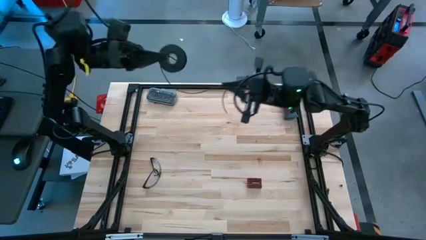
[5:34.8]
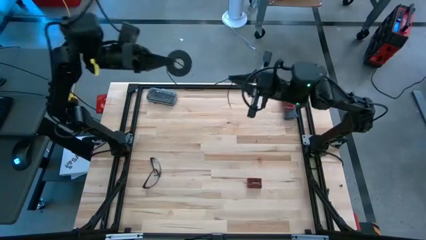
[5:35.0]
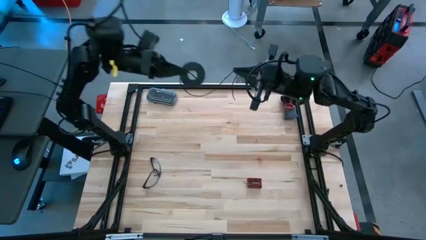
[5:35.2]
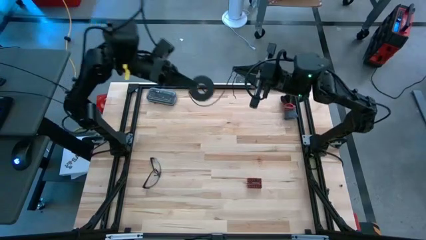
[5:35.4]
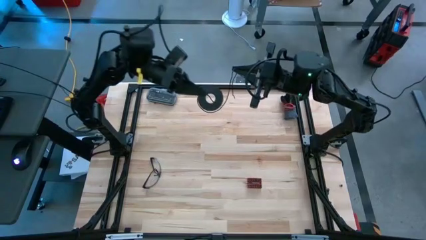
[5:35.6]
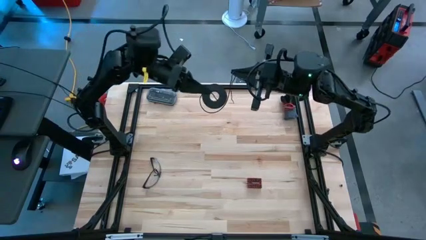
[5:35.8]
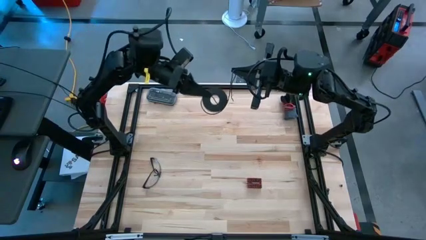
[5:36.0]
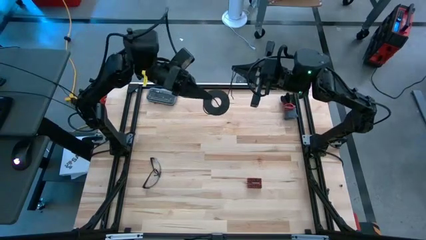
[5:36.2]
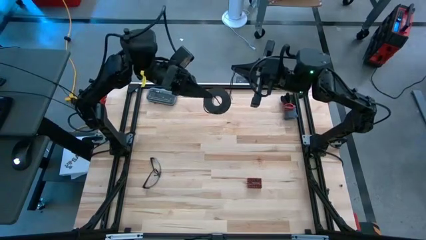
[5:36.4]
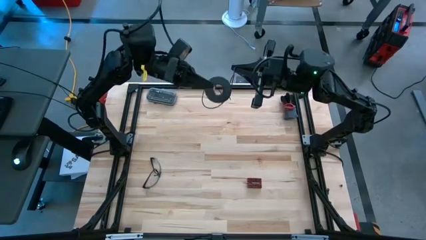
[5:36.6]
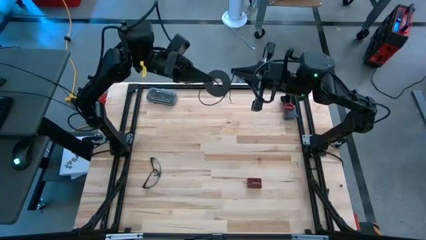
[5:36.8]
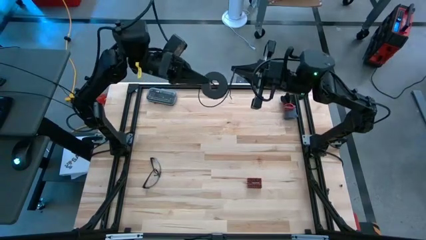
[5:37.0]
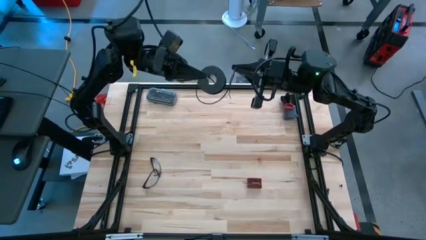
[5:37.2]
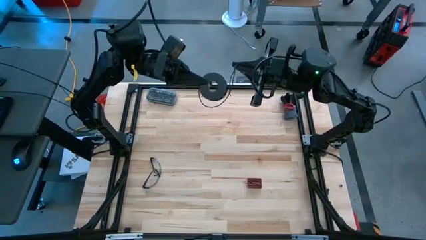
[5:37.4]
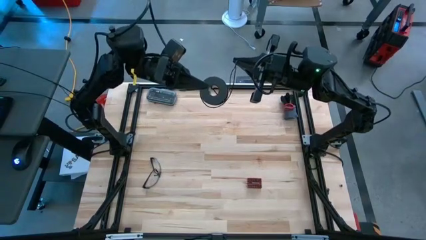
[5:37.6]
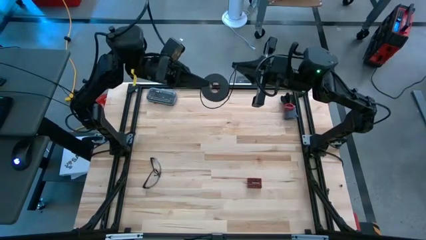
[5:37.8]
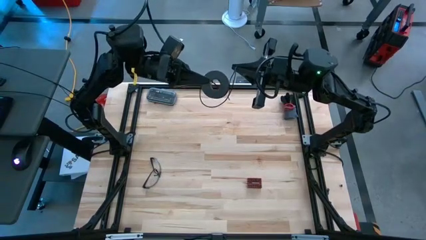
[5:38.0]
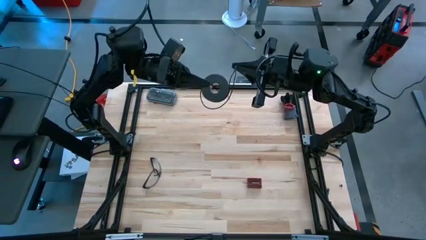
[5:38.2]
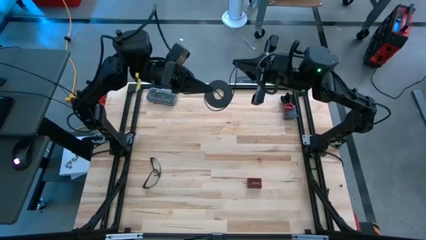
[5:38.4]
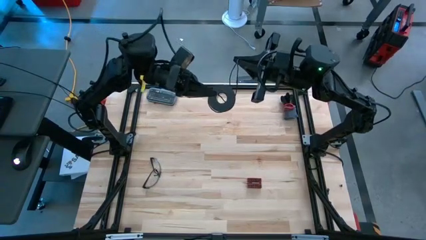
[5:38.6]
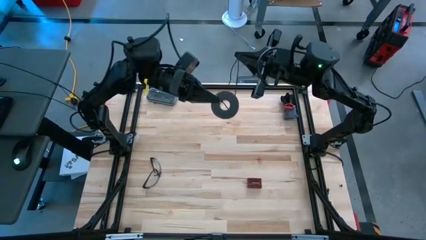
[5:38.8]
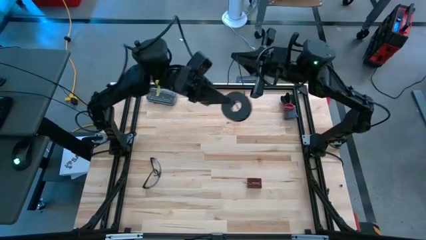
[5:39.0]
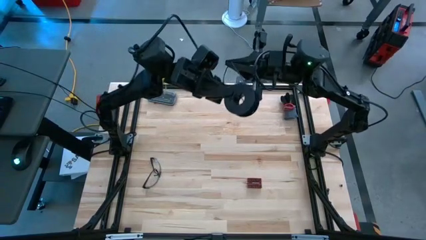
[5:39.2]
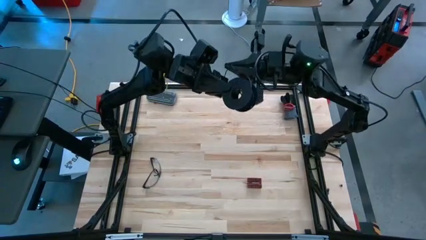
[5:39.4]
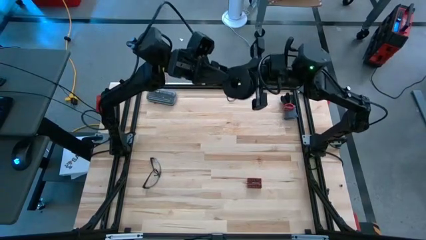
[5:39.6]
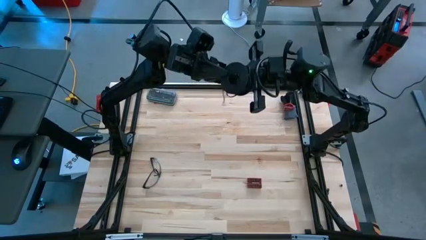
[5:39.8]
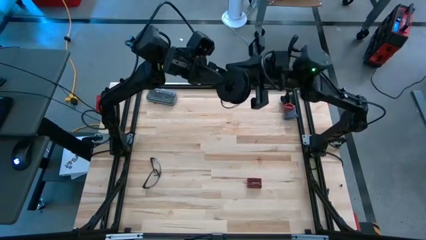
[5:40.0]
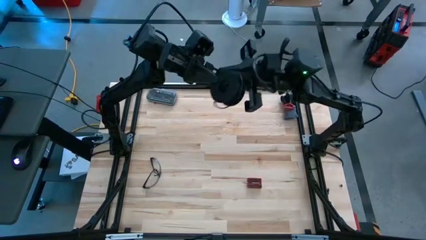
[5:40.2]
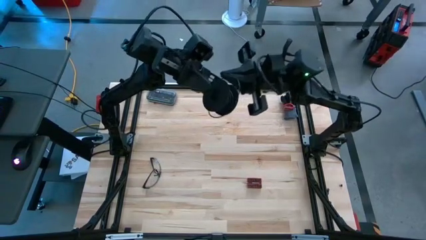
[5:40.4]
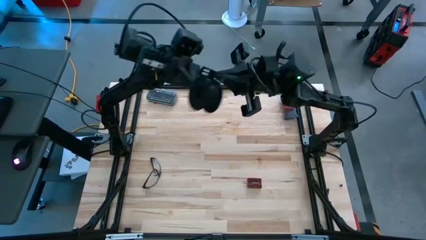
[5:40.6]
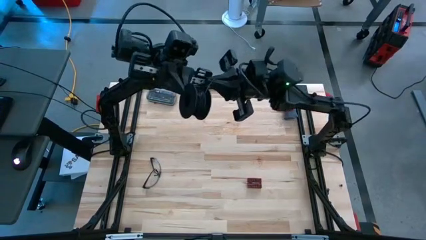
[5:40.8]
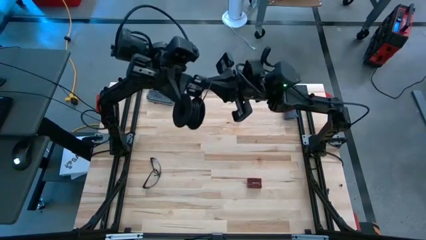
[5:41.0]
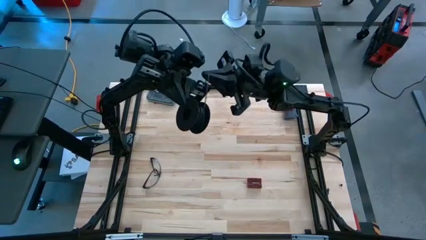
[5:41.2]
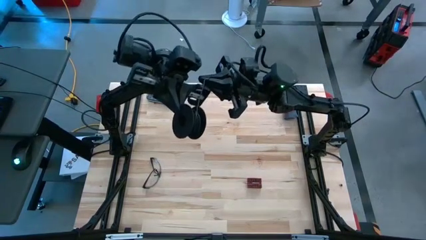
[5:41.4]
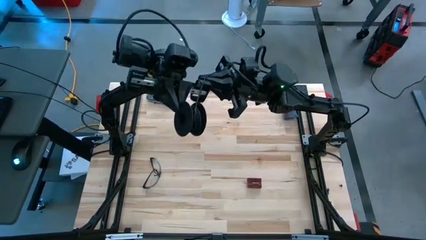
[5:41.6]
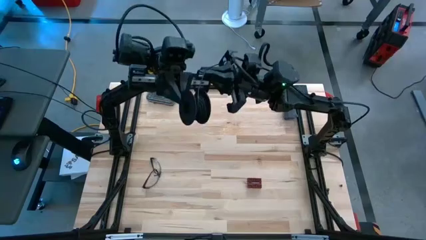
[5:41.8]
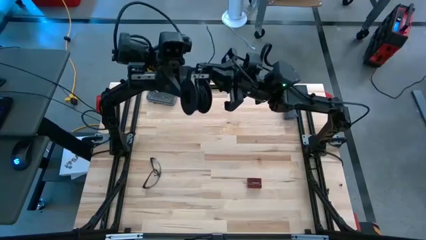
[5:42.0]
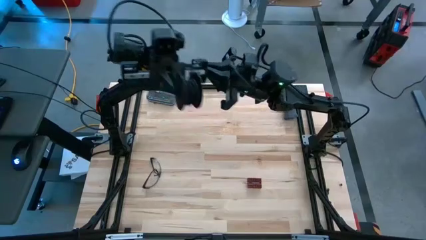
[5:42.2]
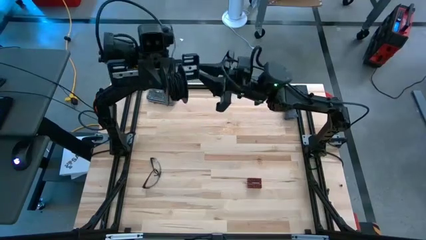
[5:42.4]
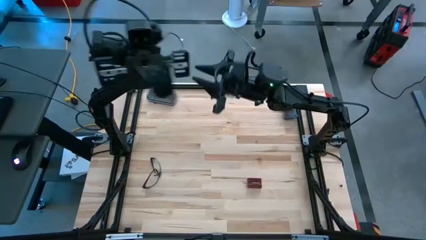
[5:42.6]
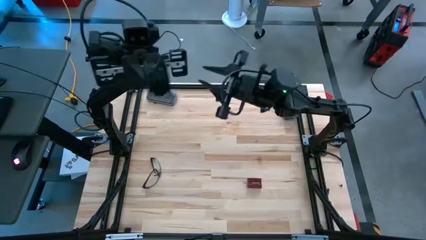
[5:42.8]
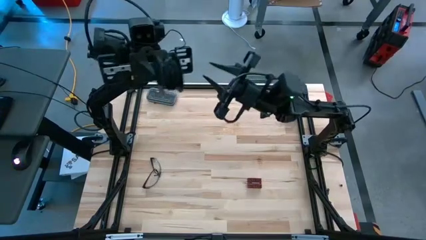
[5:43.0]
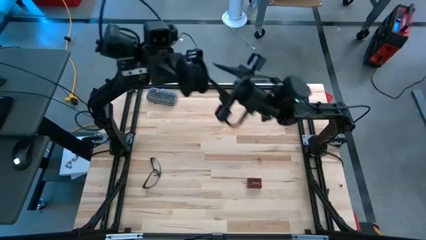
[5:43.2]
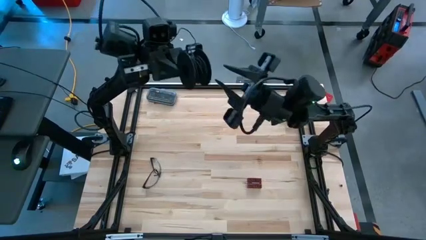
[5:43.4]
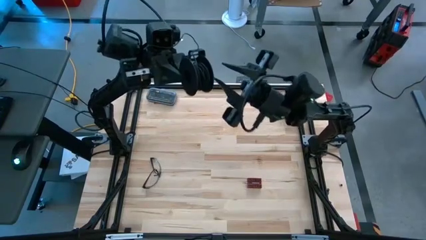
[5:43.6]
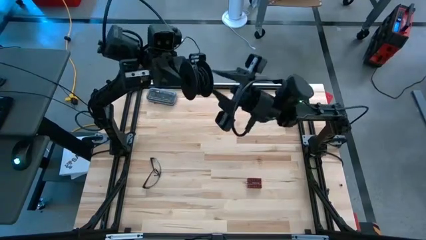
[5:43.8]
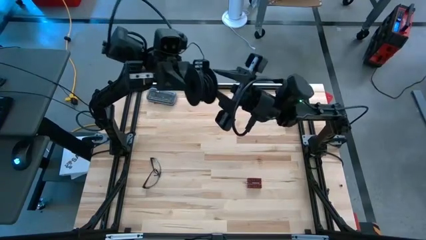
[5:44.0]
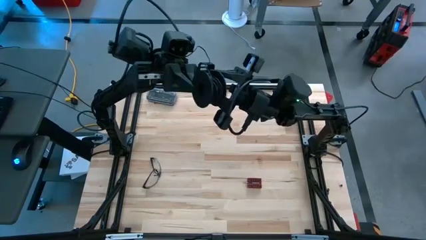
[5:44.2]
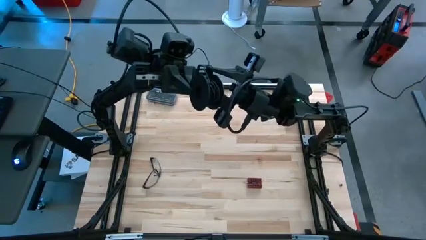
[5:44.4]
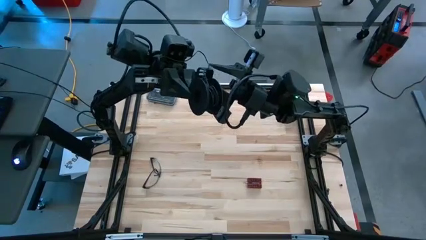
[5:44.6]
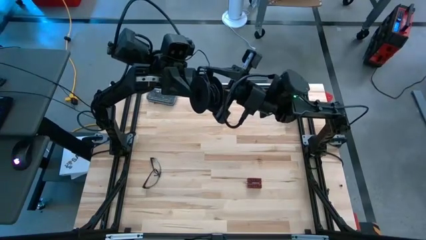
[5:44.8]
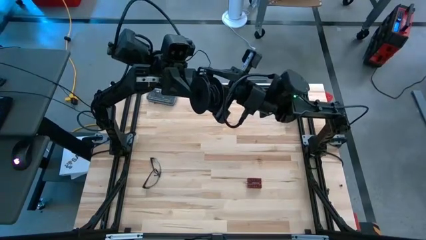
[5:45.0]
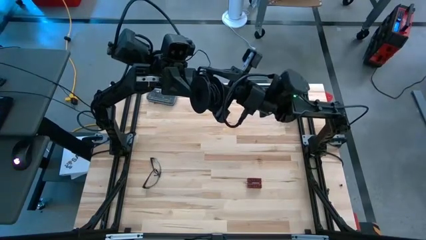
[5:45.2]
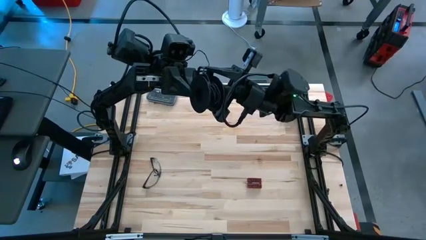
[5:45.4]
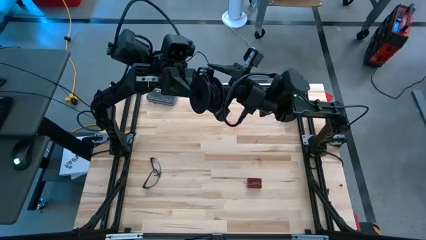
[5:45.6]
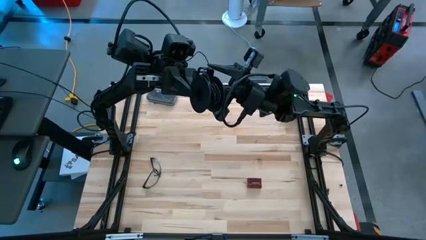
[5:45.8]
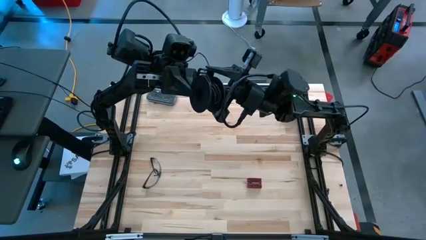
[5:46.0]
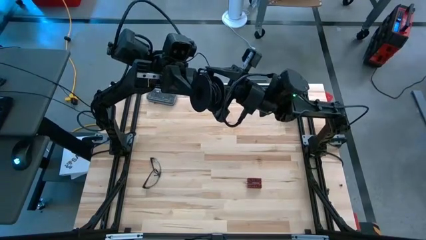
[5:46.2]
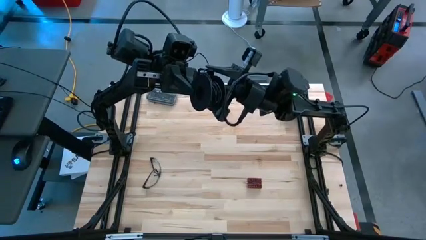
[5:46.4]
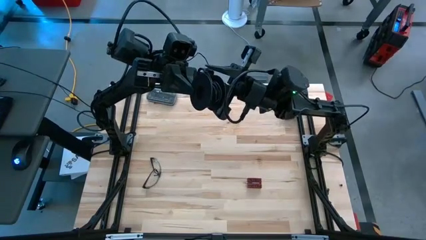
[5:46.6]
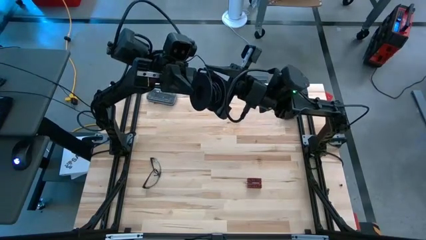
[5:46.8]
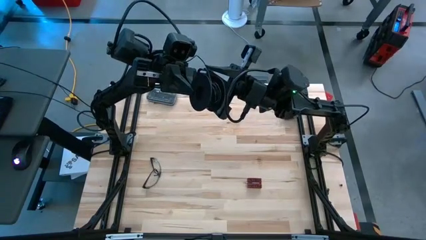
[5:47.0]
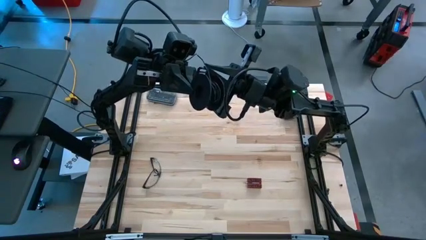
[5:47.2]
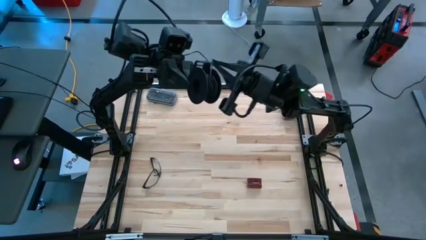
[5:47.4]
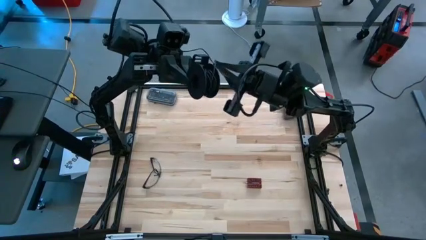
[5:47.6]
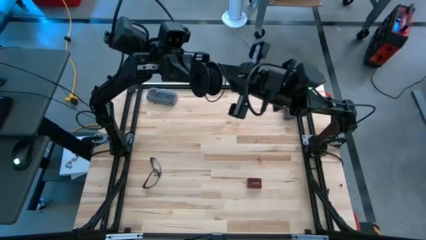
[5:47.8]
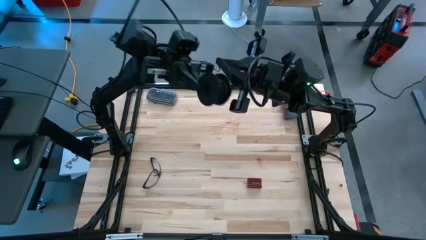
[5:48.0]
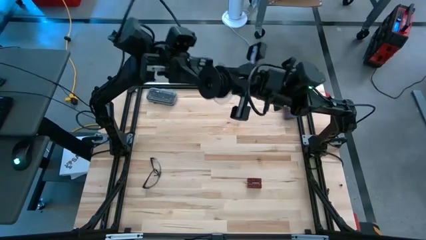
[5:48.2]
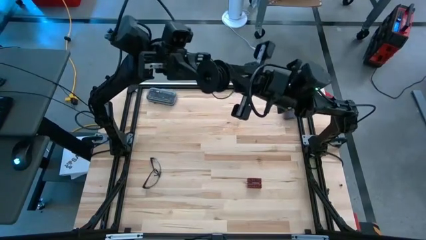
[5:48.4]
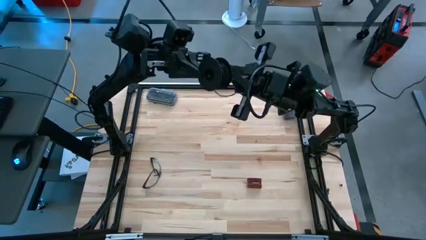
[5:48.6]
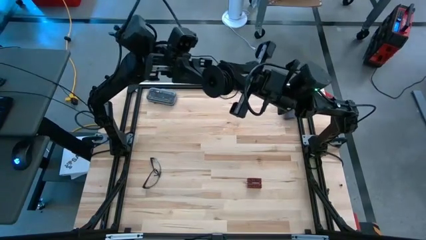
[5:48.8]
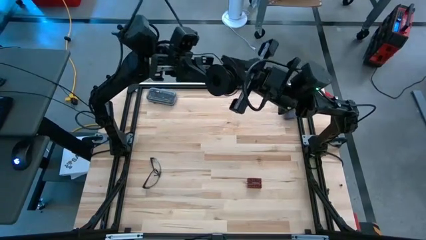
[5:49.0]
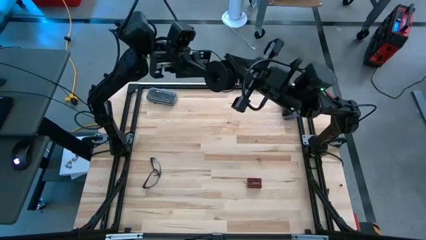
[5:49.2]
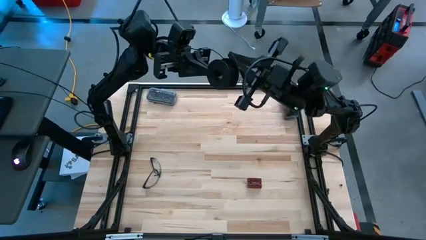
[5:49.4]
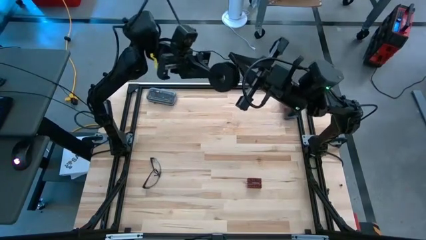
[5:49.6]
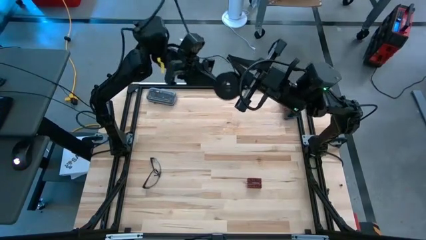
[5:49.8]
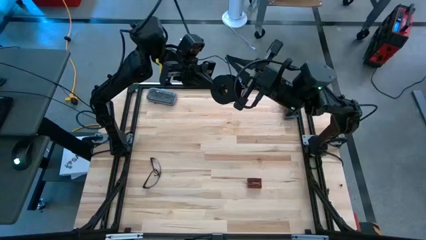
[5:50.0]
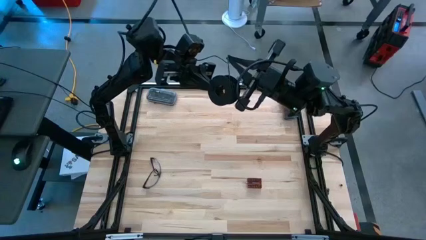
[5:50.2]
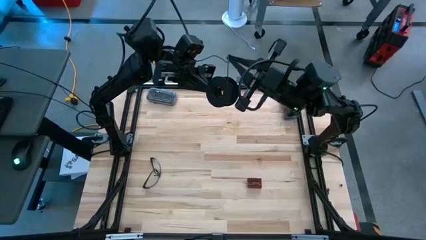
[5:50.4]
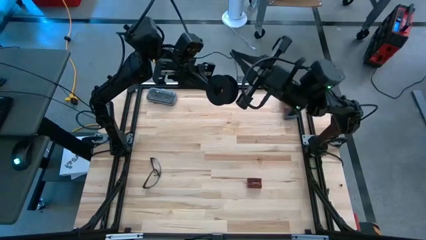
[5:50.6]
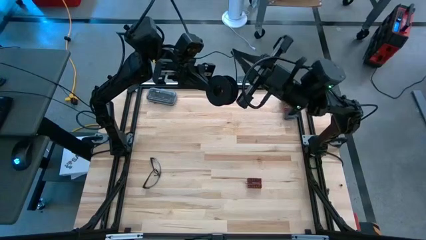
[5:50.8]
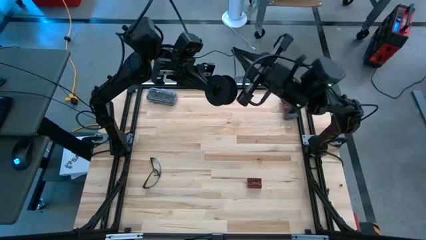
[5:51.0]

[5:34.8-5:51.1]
Task: Coil cords
Coil the black wire into the spool
